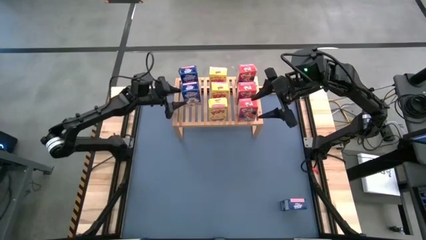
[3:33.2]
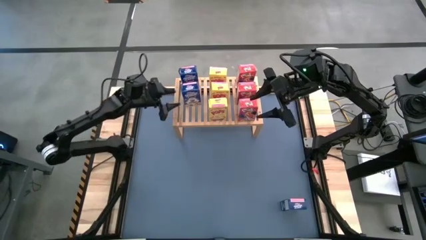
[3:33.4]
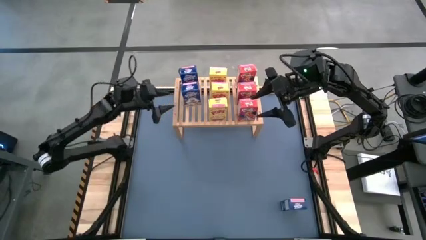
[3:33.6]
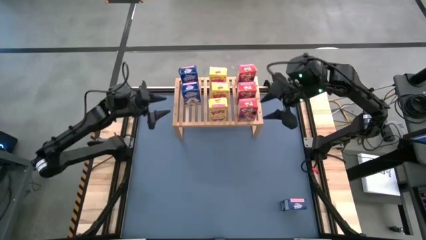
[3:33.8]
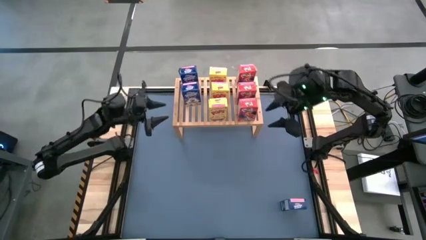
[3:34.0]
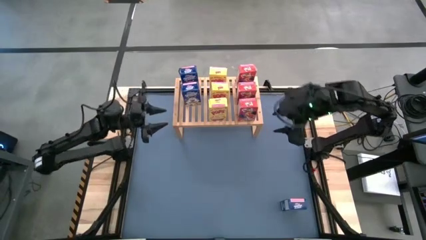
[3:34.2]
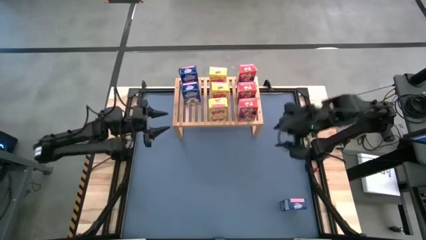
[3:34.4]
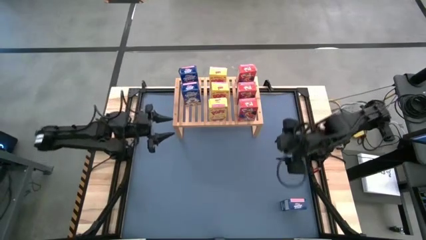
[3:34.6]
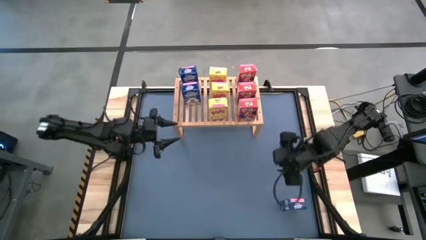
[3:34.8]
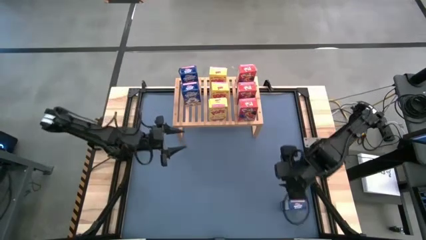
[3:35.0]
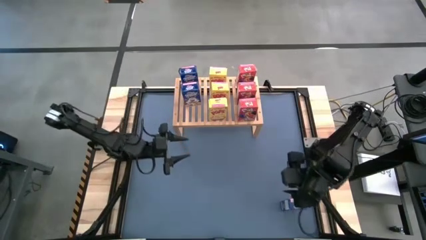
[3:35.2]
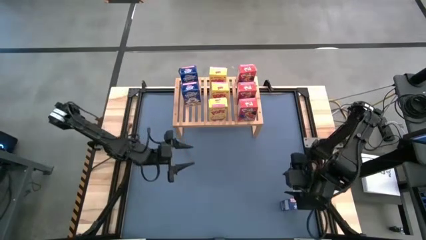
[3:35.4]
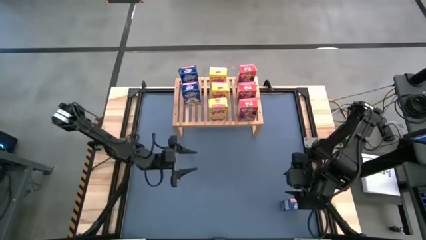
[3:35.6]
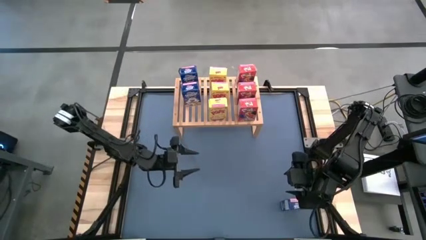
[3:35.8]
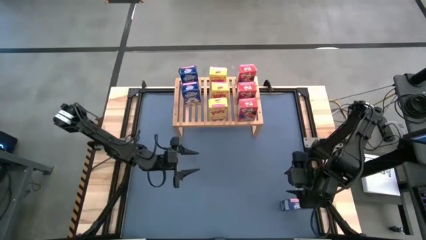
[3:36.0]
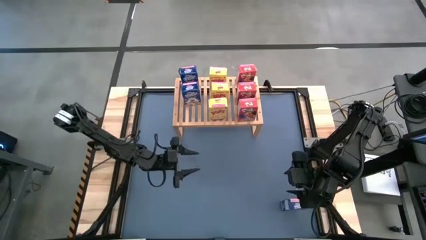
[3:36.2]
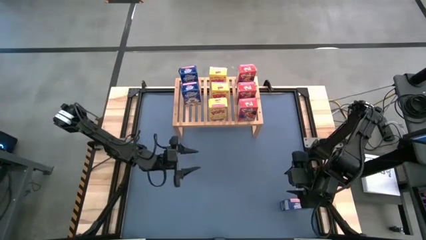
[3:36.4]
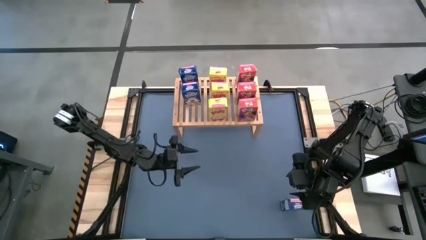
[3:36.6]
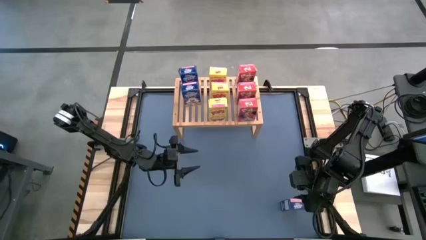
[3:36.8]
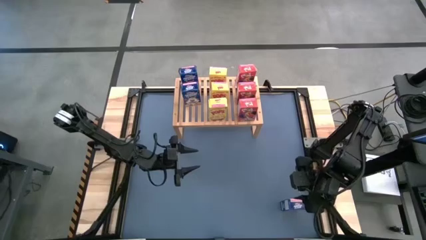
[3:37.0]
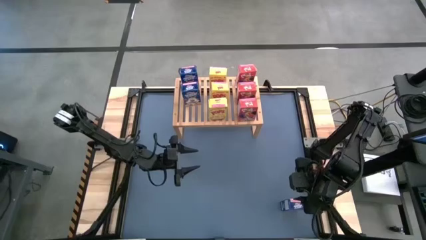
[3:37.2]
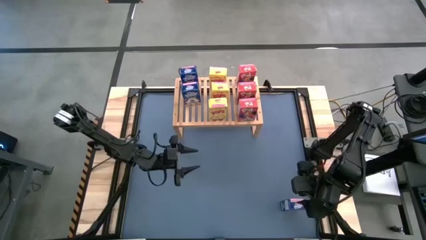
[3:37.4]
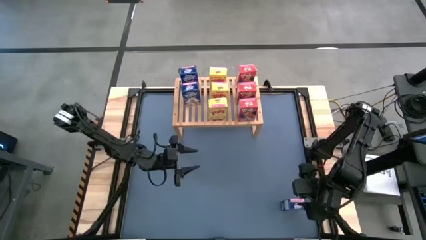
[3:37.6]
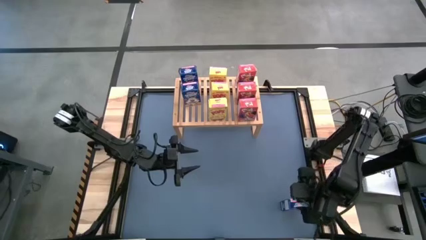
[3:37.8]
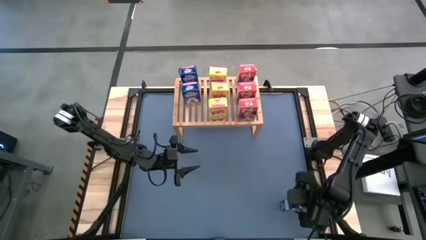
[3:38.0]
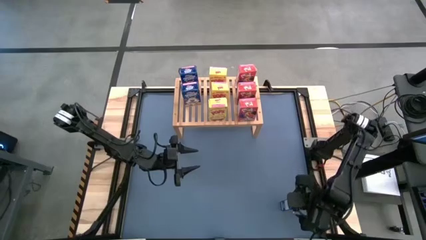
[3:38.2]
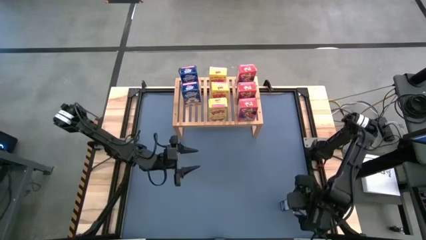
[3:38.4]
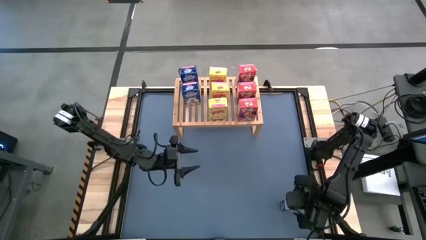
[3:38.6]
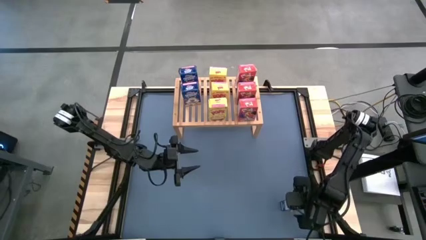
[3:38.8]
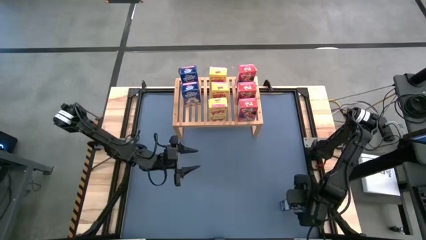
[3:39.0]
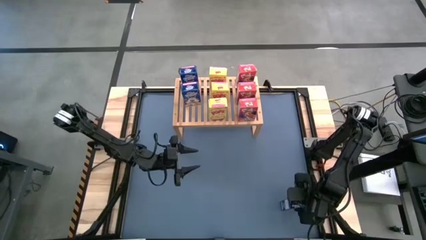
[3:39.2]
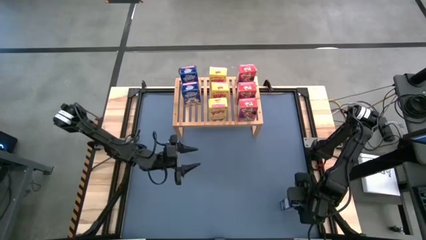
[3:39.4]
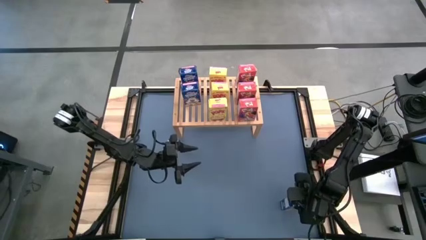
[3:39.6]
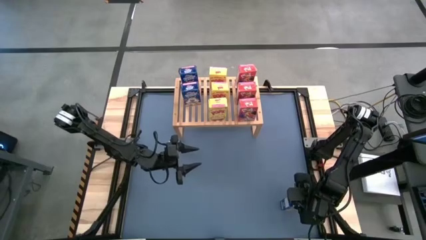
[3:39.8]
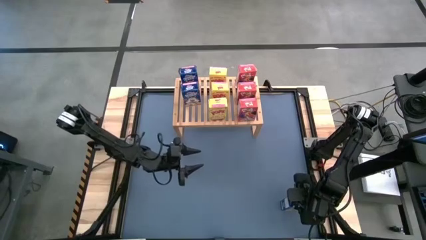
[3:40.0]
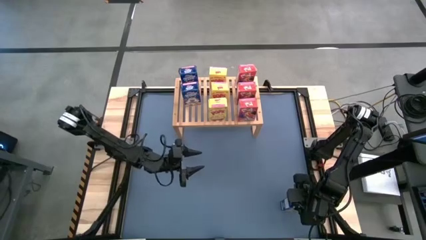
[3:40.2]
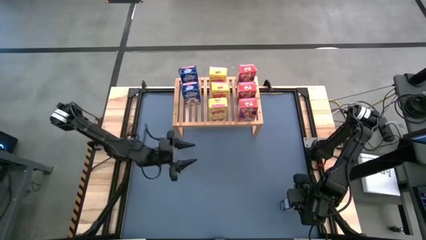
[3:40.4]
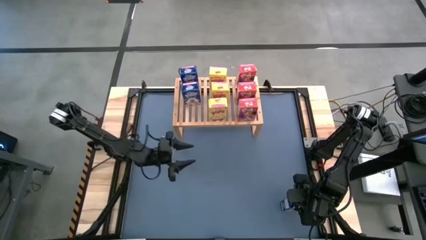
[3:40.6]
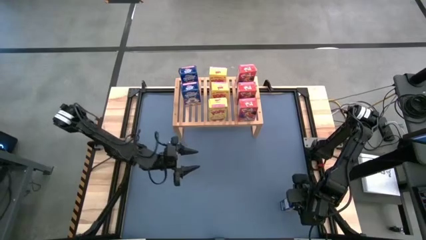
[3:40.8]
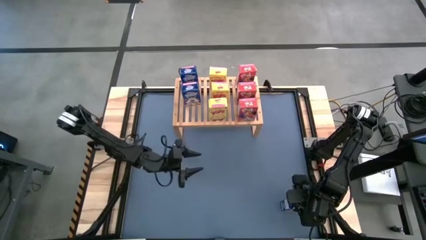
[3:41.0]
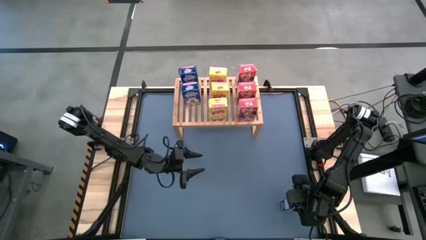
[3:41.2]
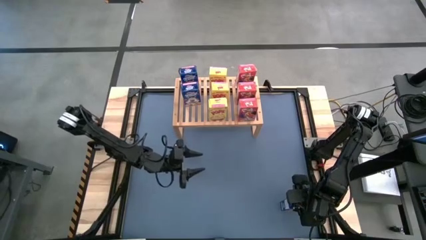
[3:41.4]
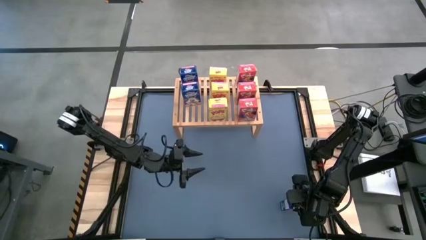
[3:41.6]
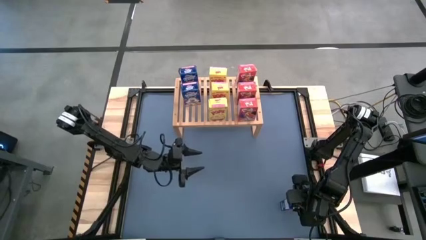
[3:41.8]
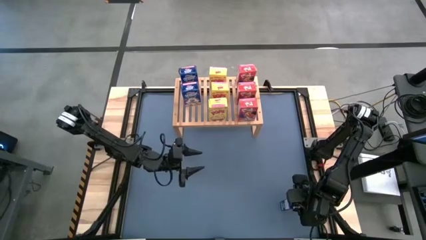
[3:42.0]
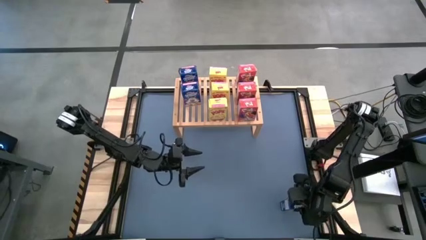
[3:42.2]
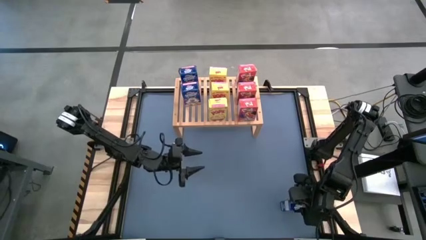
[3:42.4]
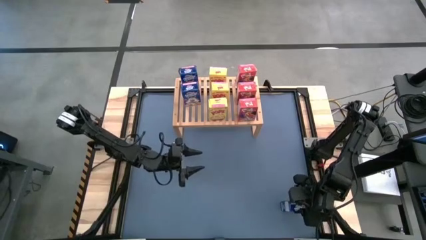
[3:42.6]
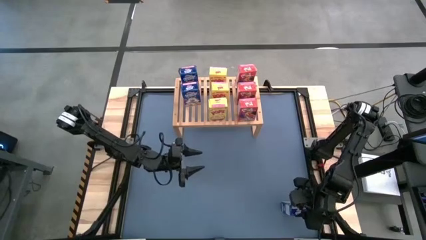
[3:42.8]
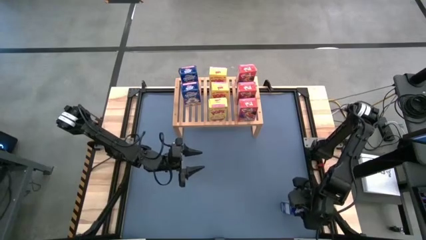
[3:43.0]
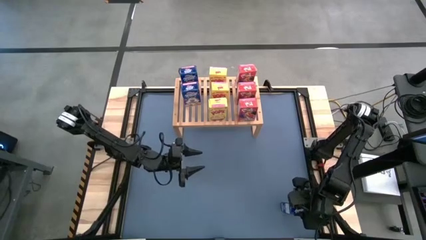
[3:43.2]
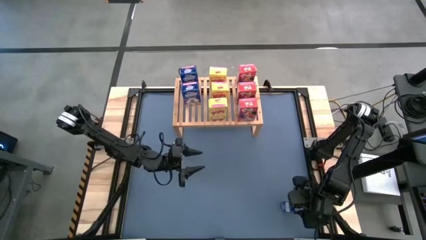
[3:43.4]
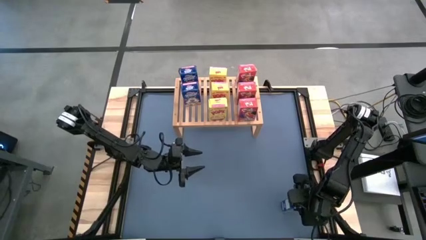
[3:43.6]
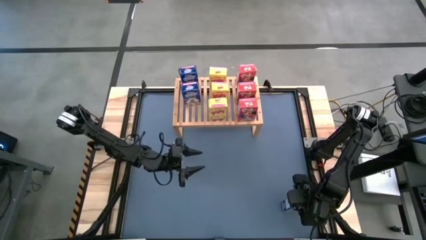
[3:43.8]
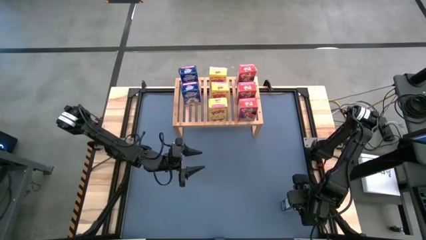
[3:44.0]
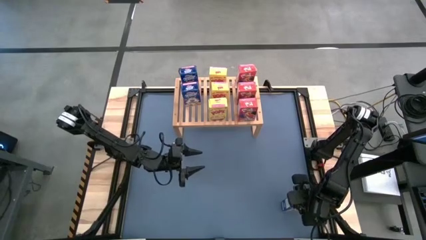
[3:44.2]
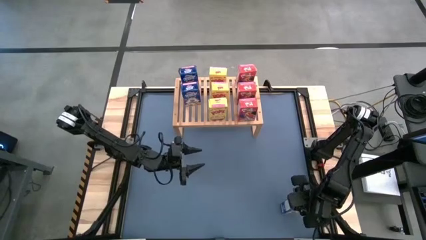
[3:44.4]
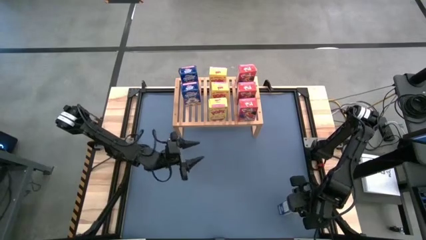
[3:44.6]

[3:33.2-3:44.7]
Task: Stack cereal on shelf
Put the blue cereal box on the shelf aligned with the other blue cereal boxes

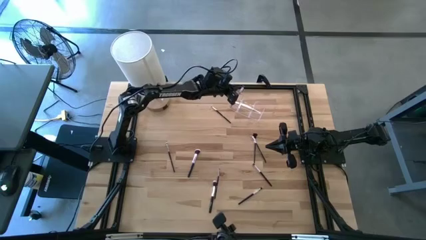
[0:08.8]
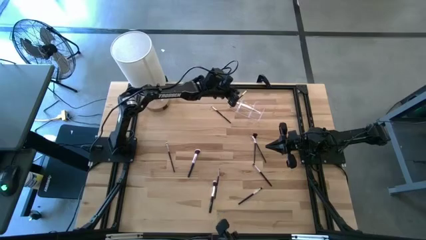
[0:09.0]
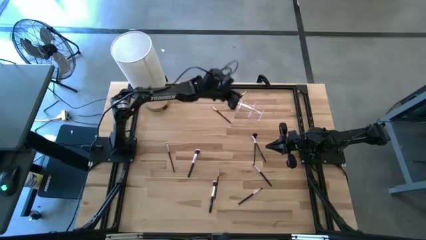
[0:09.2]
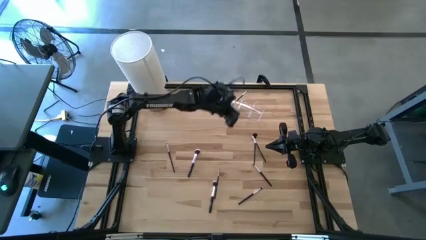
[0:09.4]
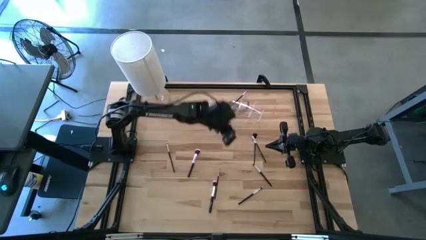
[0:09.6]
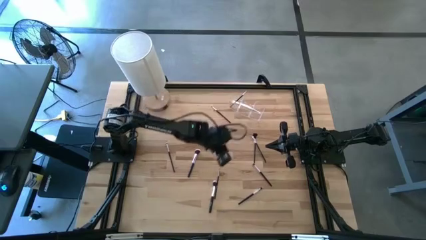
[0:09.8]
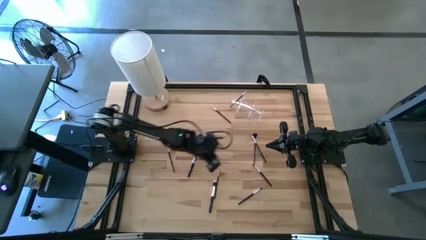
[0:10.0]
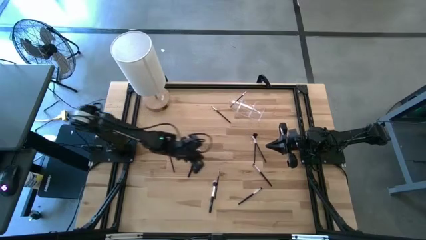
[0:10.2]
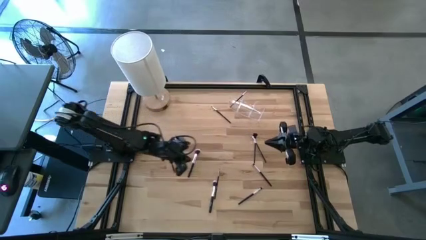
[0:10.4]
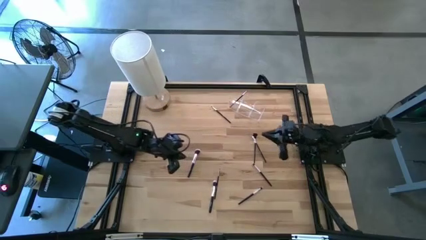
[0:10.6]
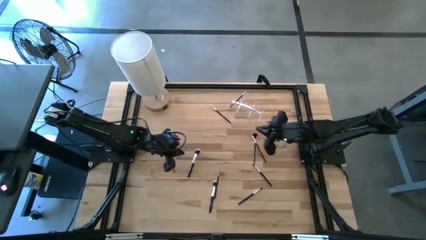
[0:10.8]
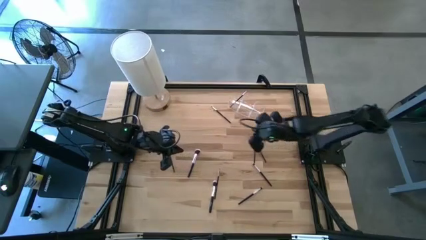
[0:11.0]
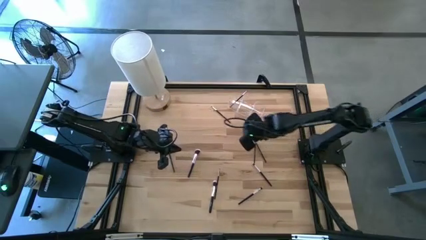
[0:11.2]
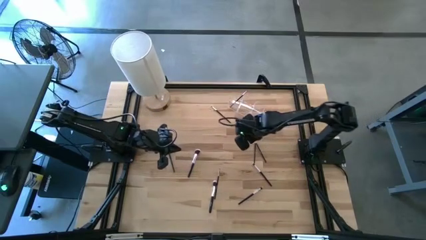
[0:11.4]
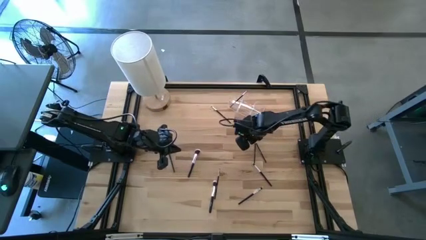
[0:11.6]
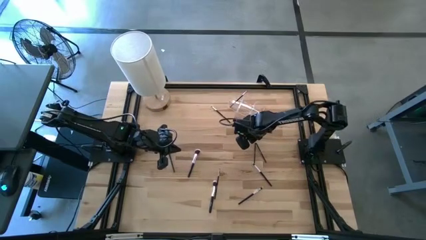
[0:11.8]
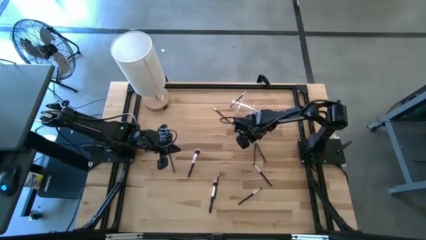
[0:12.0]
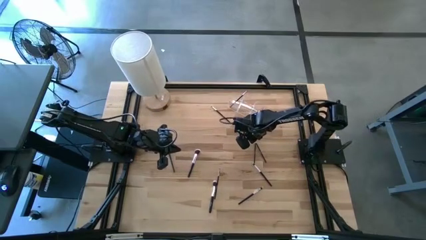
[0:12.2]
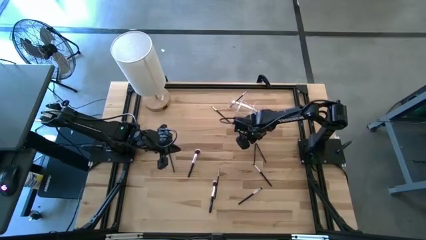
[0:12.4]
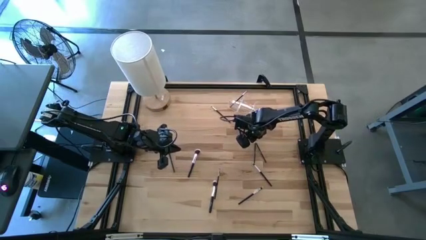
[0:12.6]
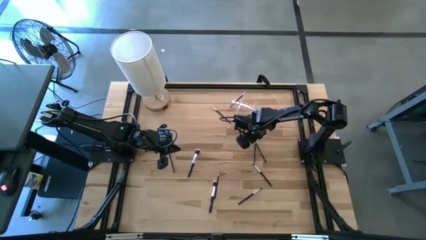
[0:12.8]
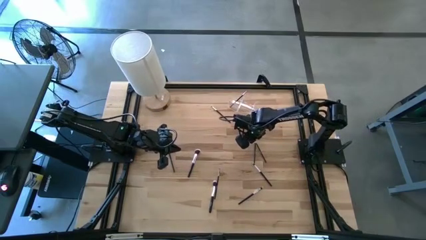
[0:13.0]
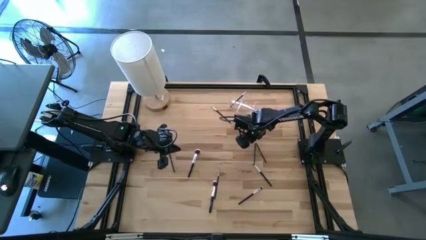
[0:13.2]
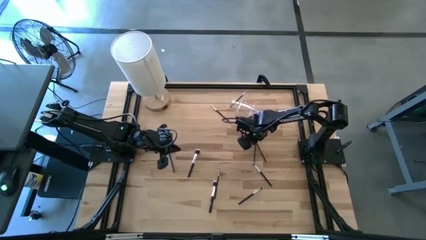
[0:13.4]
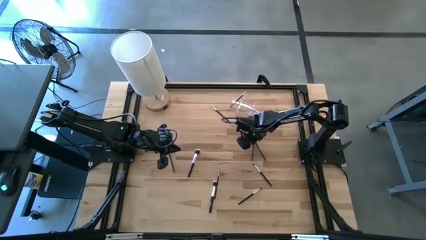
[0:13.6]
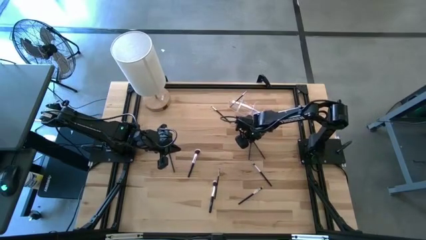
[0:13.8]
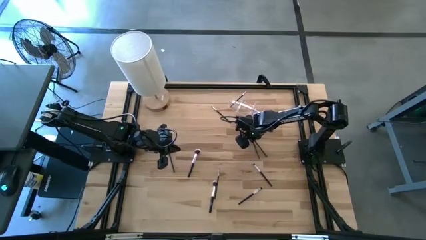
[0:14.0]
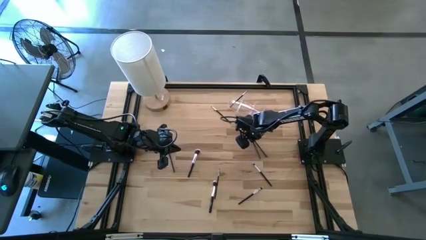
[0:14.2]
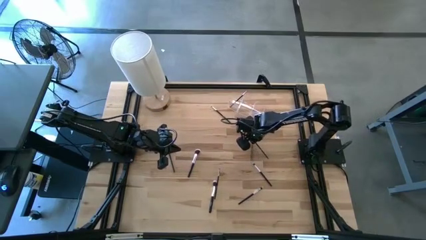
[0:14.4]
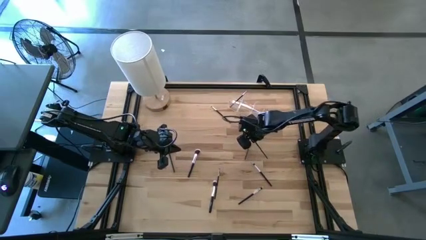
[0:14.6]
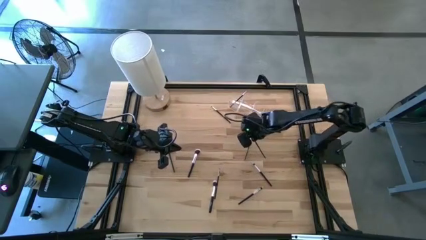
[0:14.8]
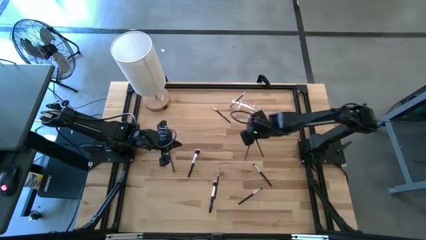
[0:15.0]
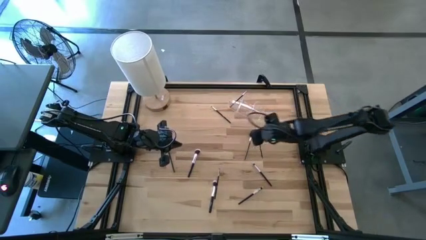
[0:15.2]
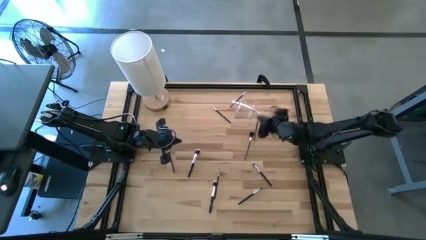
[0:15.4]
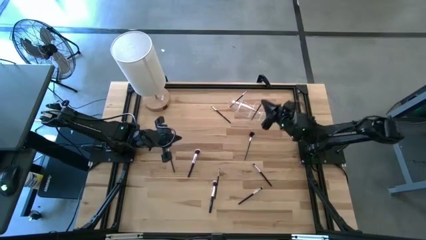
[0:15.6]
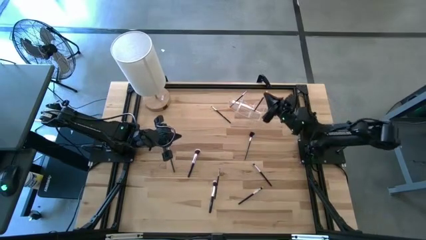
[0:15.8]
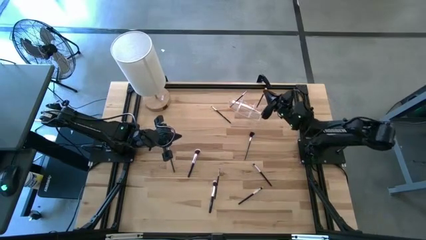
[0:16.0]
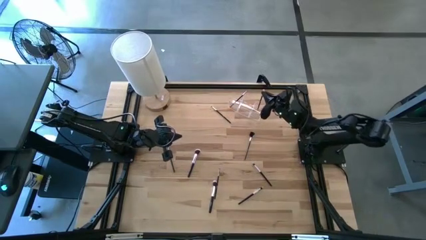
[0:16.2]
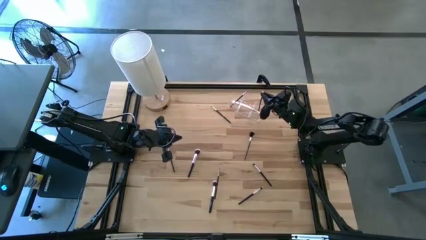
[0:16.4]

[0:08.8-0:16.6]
Task: Pick & Place Makeup Brushes
Put the black makeup brush into the transparent organizer
